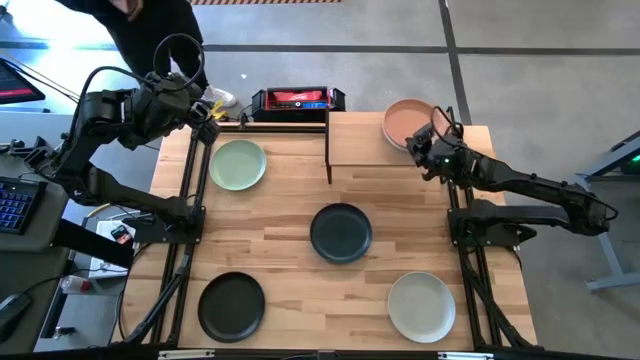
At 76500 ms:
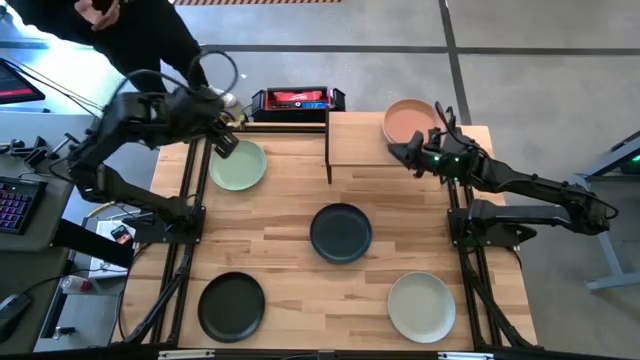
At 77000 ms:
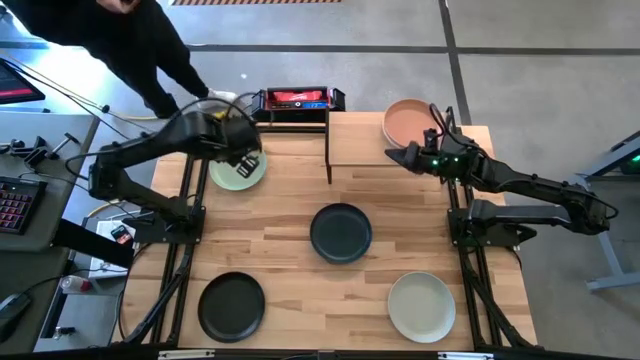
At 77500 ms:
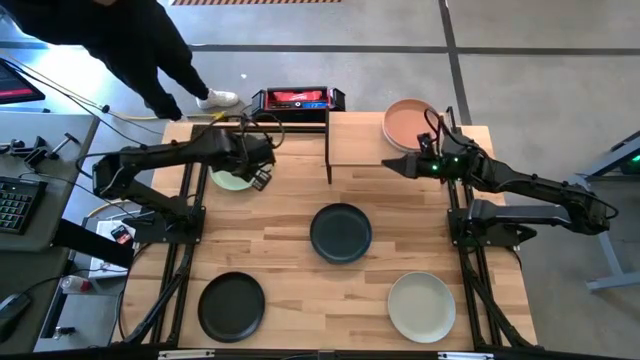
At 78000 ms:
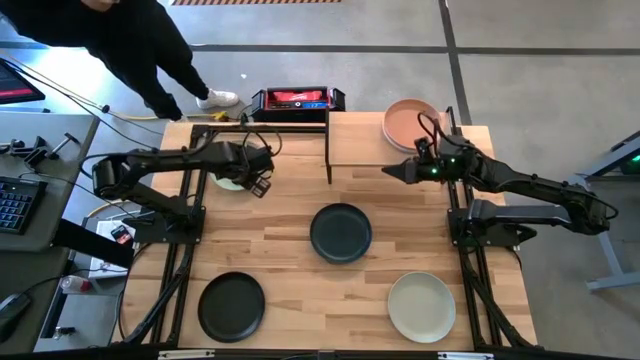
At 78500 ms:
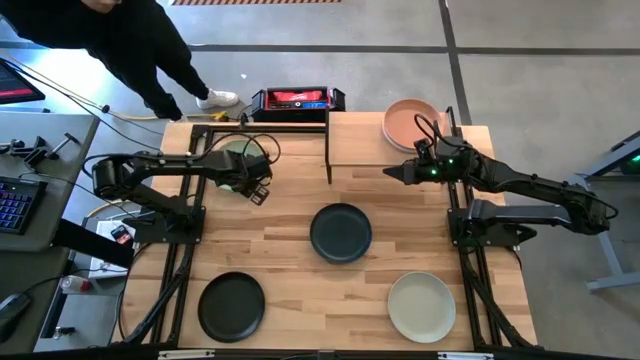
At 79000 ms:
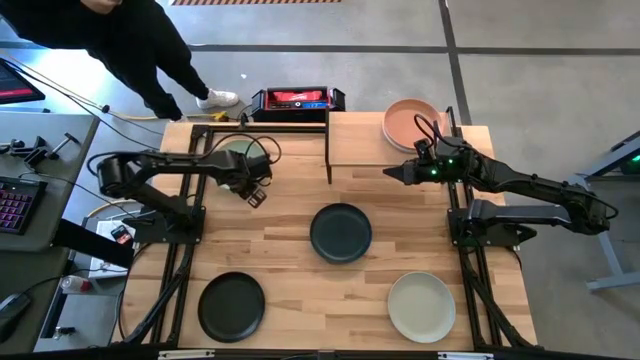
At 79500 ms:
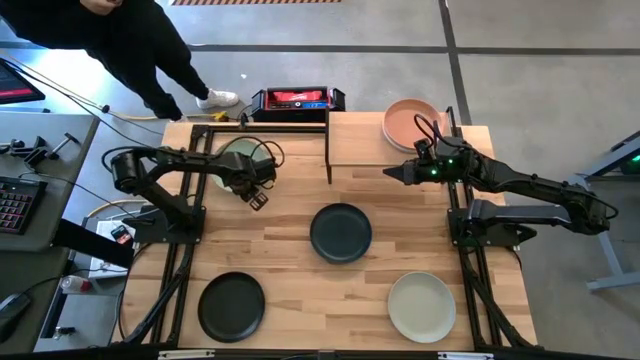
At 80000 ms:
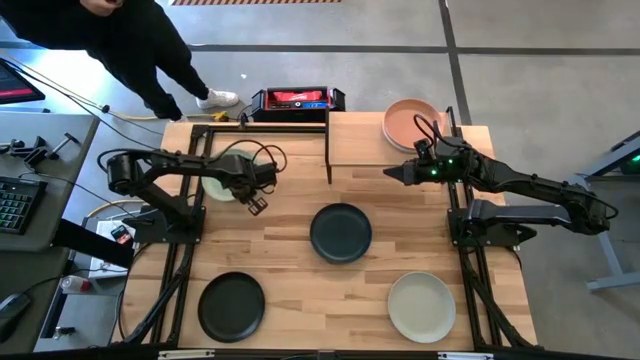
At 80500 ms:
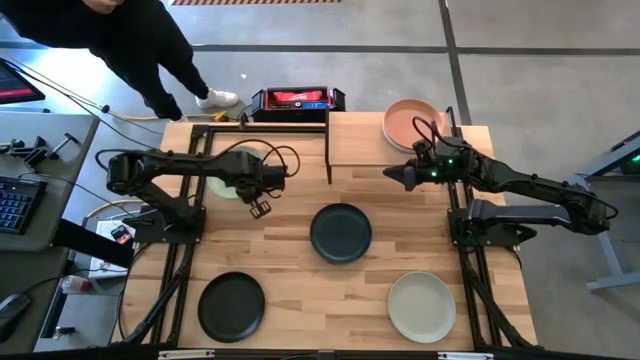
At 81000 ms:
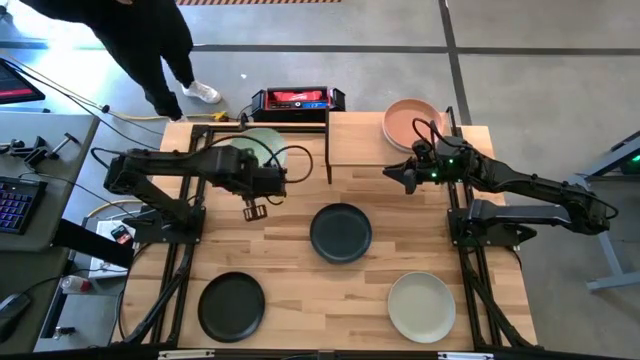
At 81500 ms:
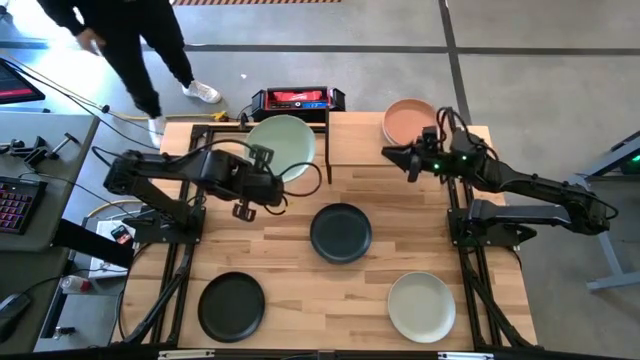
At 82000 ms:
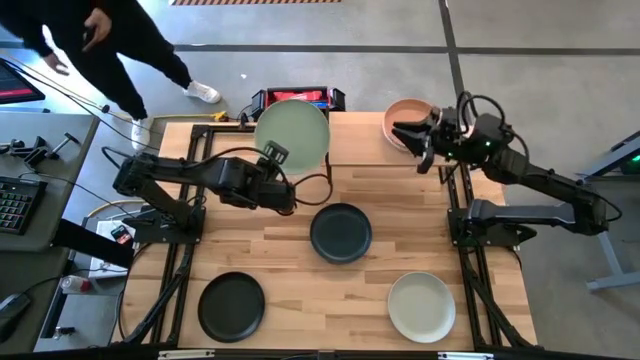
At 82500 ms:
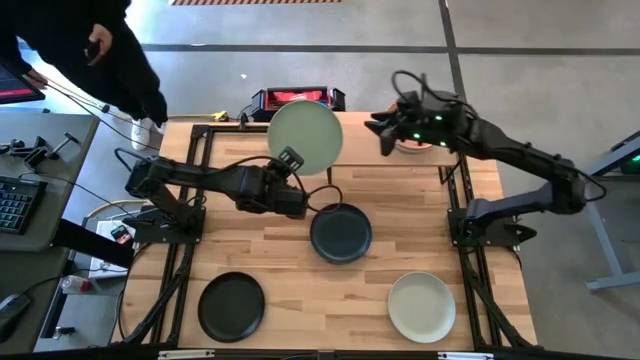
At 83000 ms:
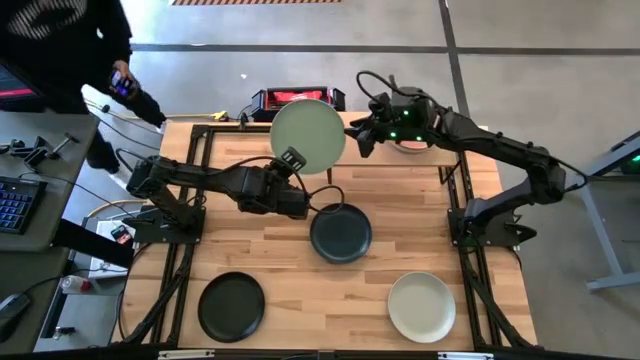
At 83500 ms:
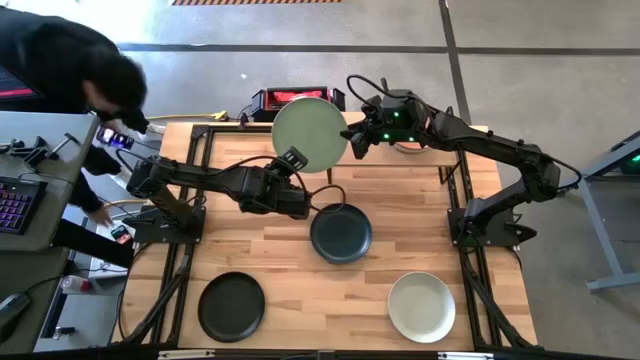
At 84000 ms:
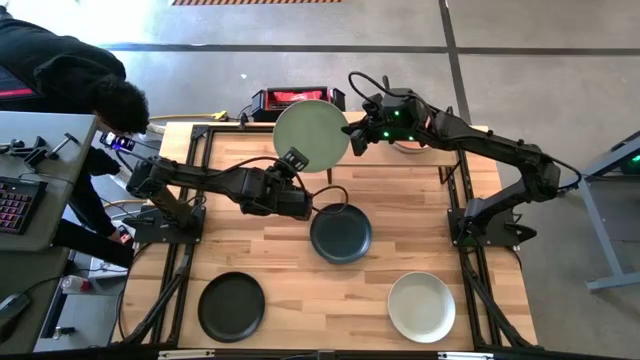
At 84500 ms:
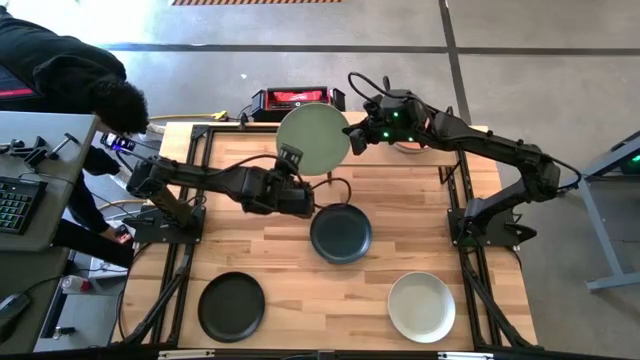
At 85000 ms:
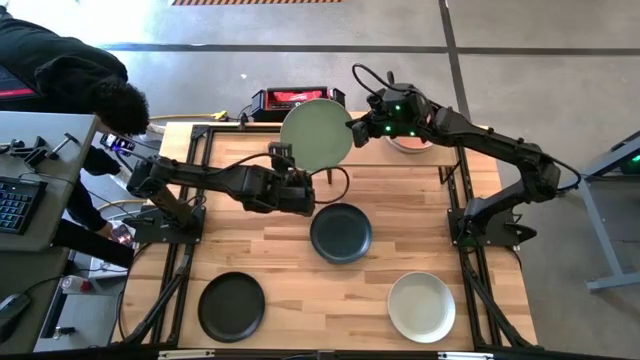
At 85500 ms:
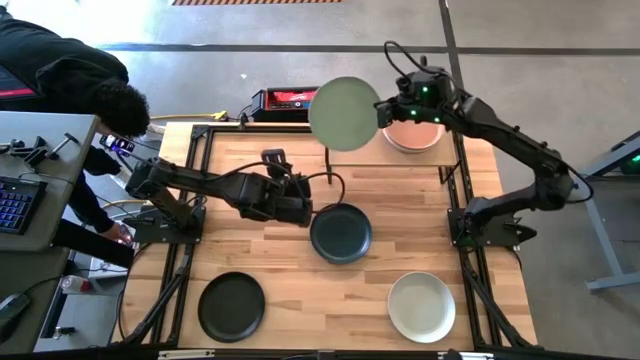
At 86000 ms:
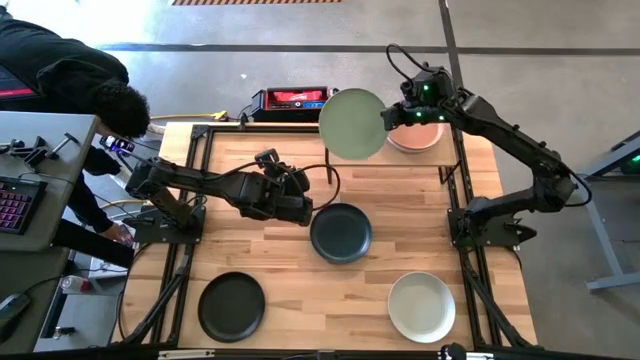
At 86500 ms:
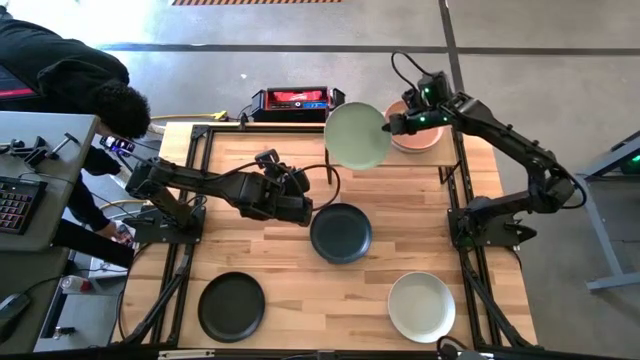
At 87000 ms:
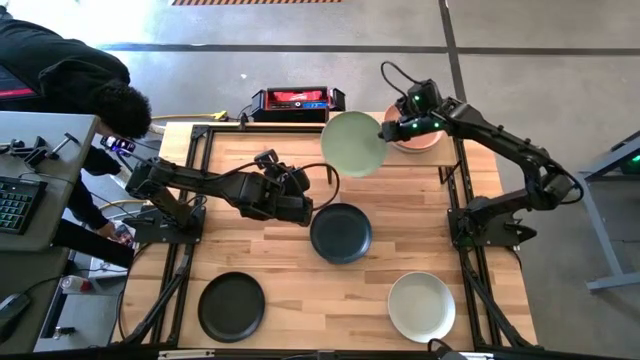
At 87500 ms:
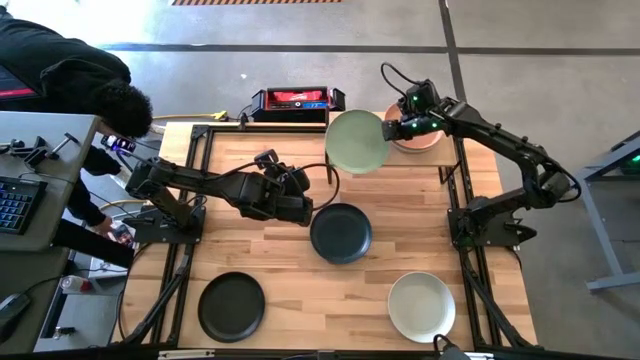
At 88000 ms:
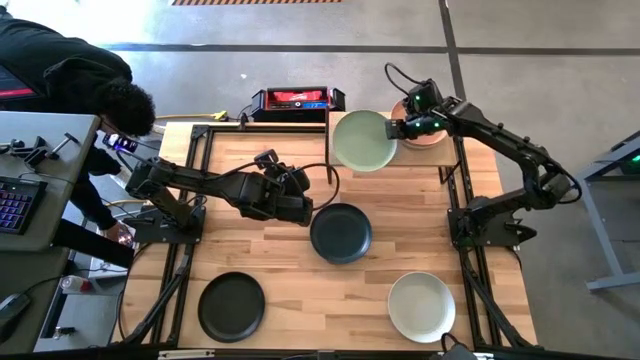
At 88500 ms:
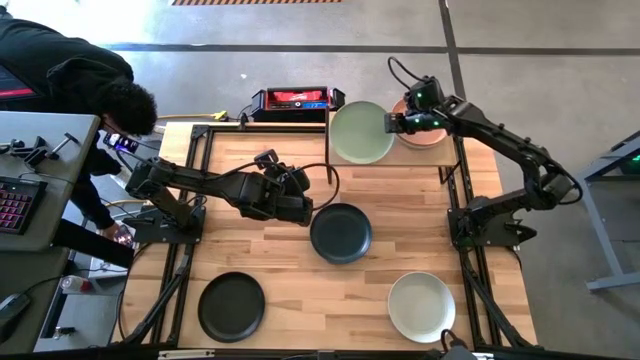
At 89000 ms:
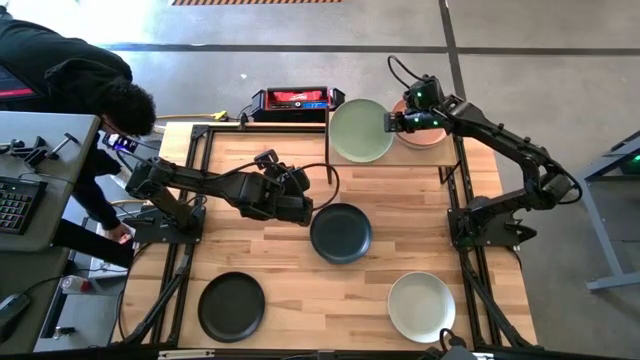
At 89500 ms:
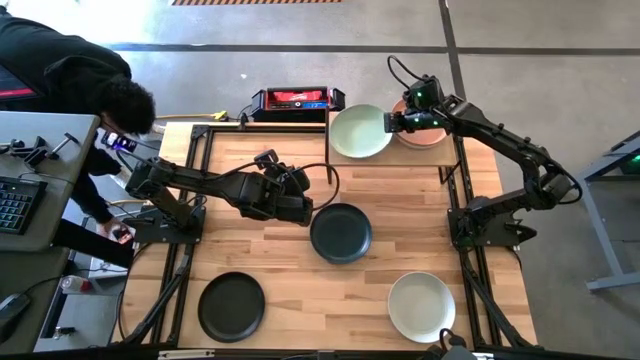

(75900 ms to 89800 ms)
Task: Place and stack plates onto a shelf
Put the green plate on the shelf

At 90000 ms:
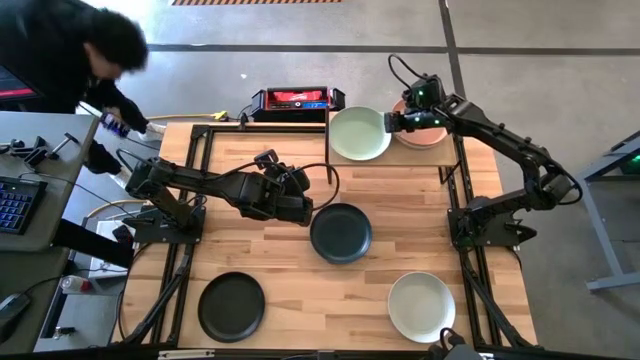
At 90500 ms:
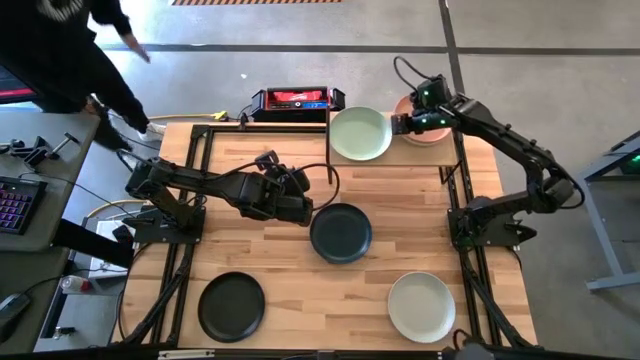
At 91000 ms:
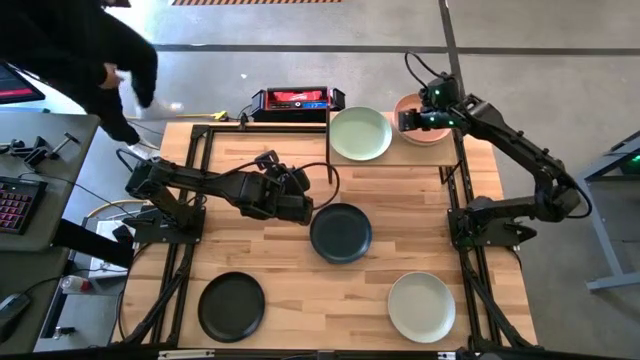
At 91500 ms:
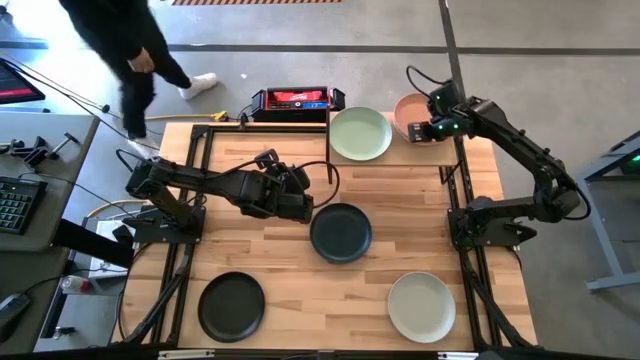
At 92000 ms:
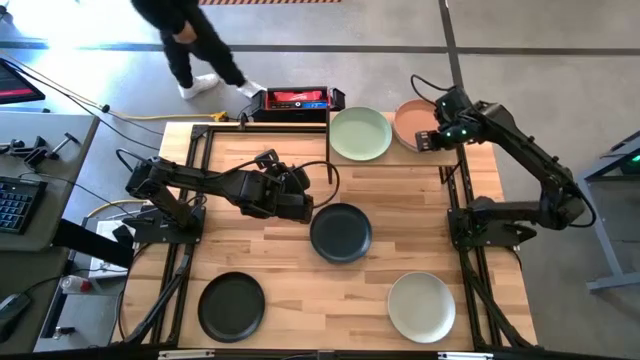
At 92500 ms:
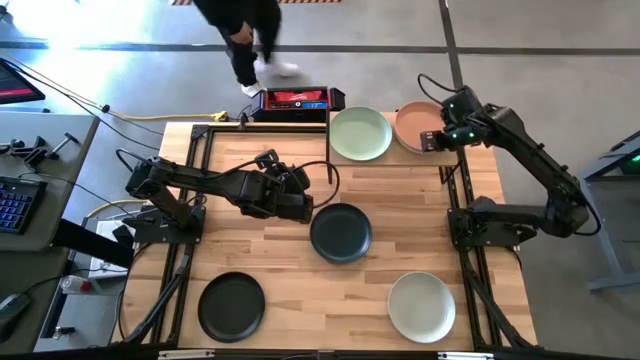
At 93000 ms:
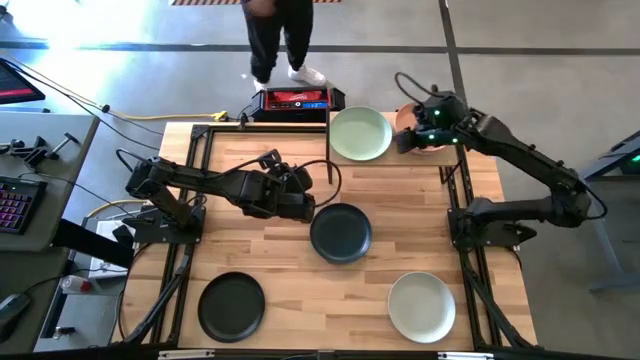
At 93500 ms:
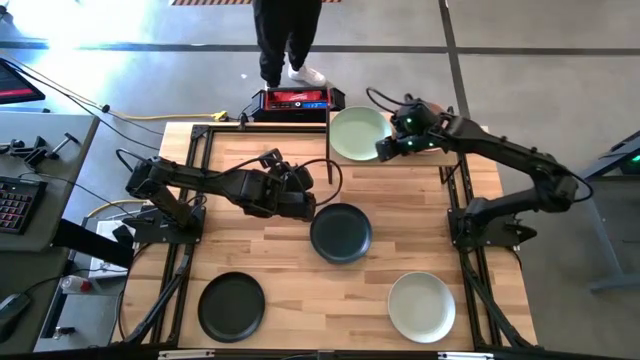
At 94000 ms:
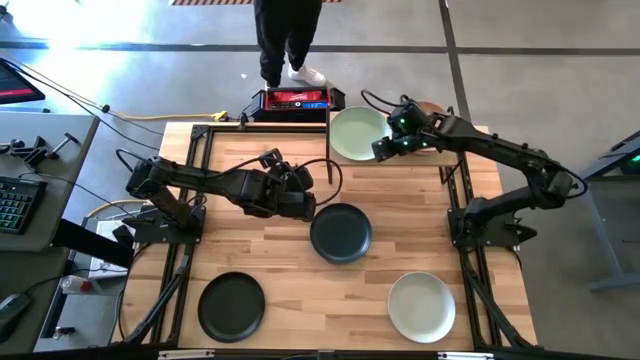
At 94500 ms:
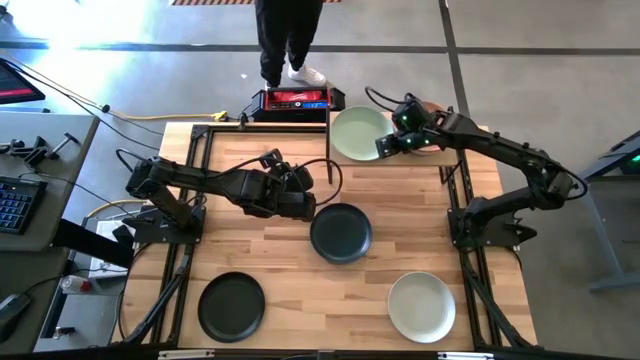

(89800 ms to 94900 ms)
Adjust the plates on the shelf

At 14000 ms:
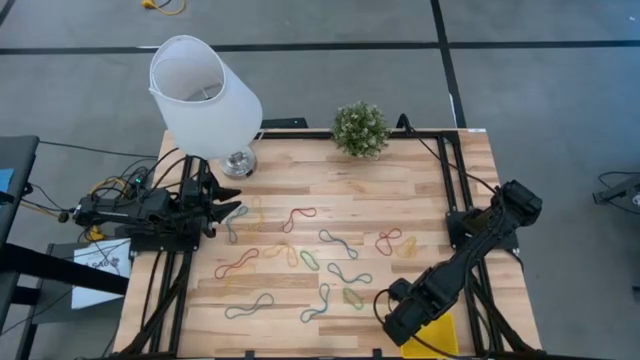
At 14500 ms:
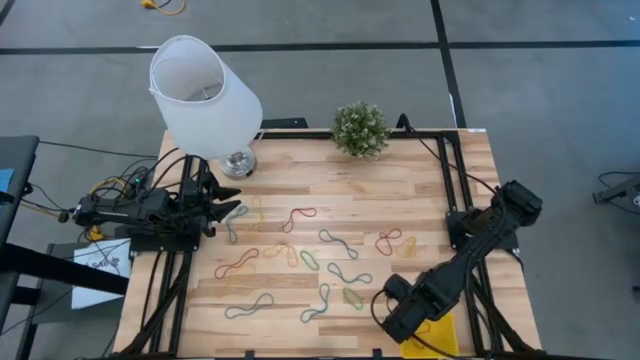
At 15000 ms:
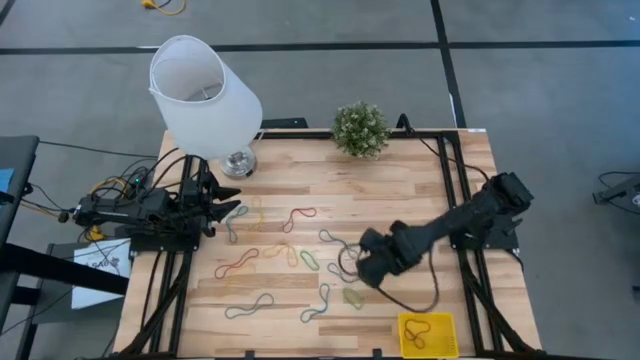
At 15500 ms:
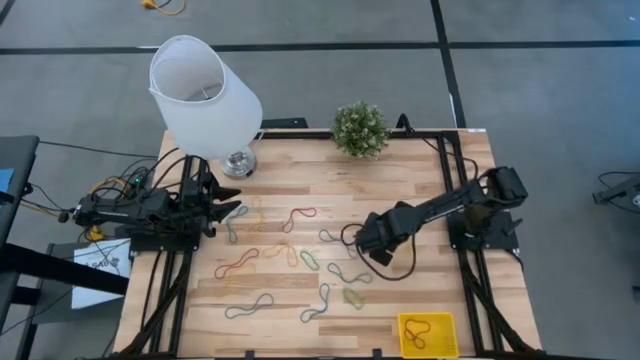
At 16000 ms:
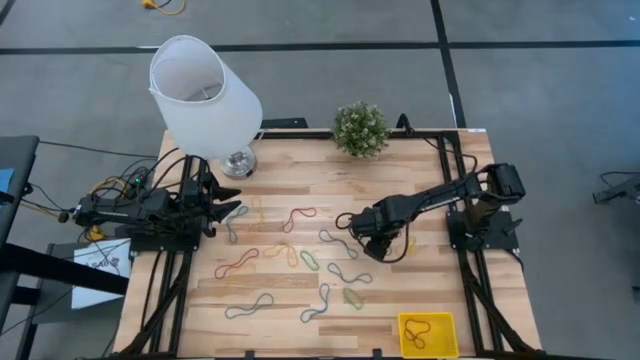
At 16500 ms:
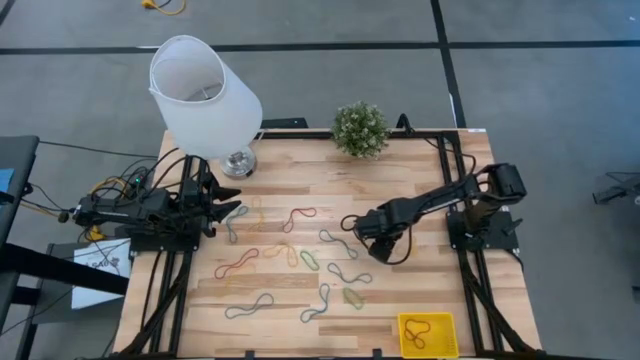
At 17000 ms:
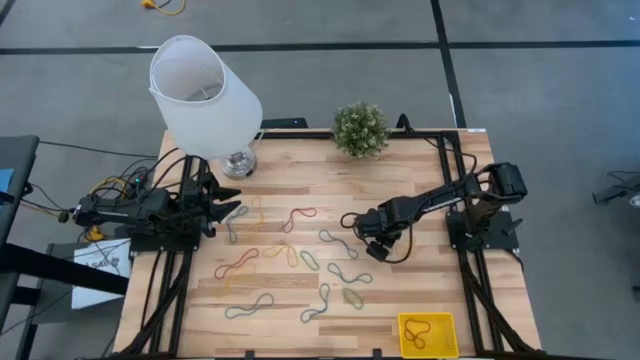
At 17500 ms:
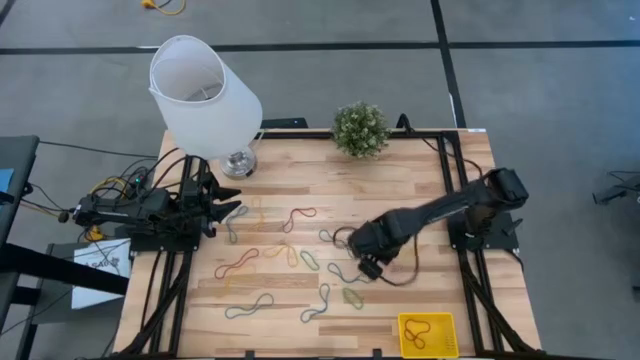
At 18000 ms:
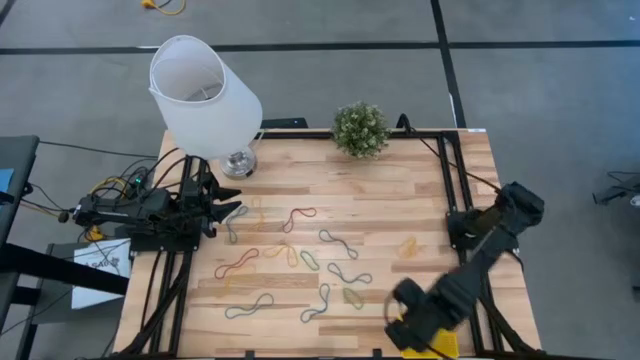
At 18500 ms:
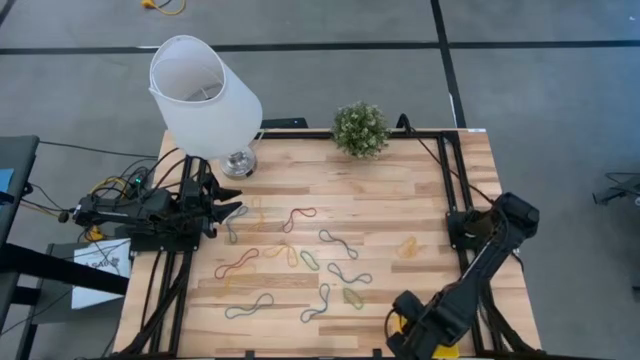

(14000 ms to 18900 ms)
Task: Pick and place rubber bands into bin
Put the red rubber band into the yellow basket
